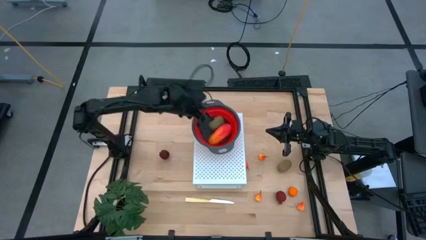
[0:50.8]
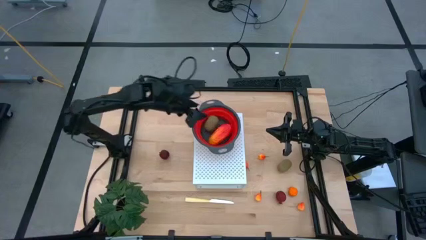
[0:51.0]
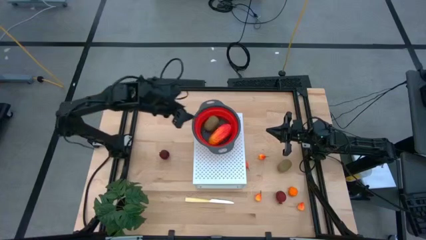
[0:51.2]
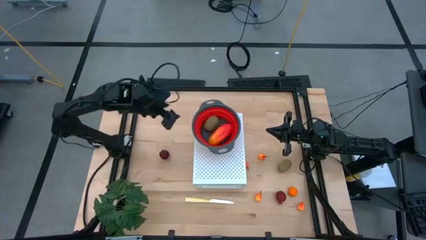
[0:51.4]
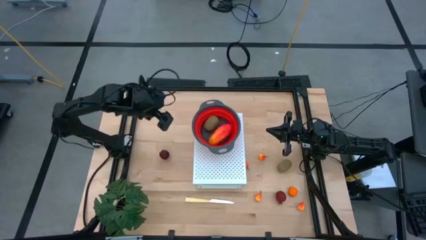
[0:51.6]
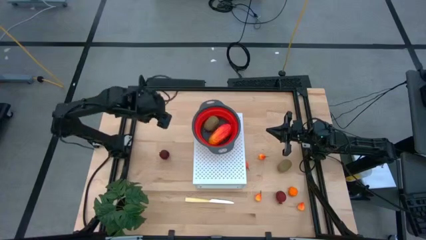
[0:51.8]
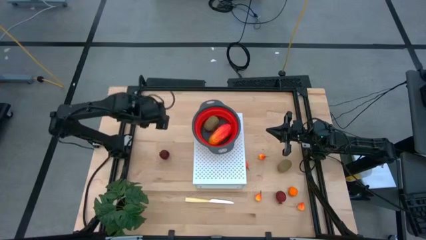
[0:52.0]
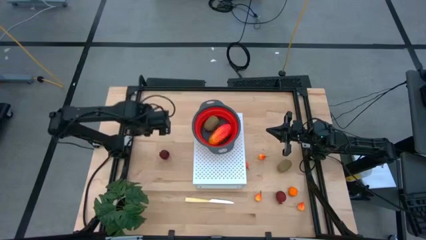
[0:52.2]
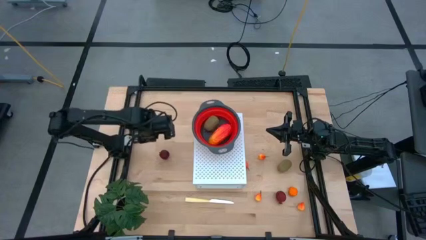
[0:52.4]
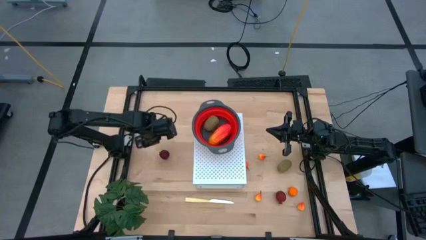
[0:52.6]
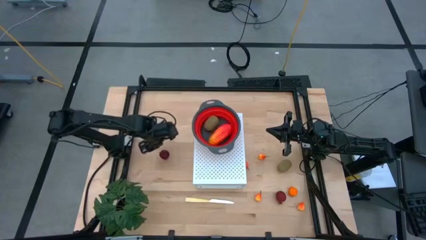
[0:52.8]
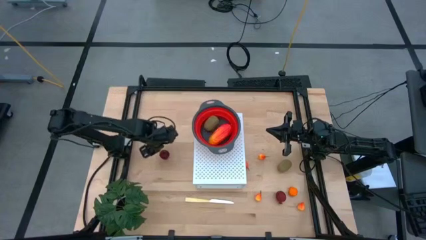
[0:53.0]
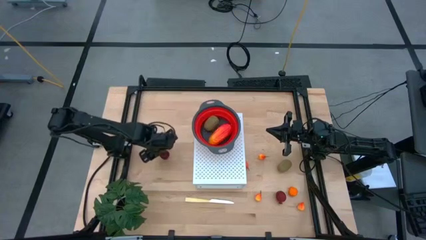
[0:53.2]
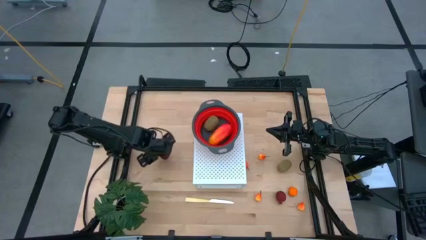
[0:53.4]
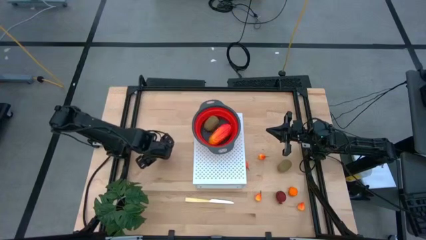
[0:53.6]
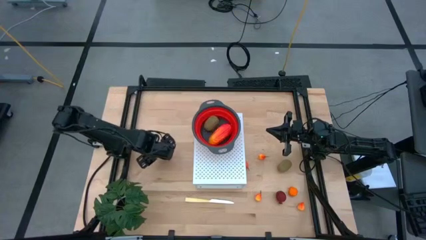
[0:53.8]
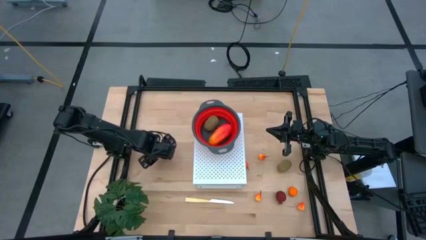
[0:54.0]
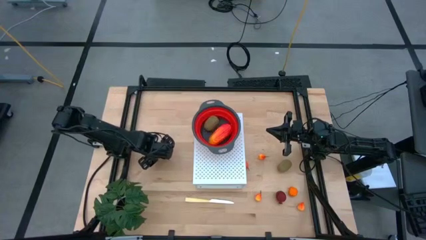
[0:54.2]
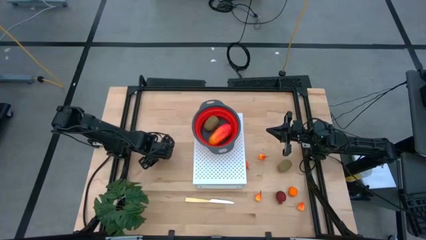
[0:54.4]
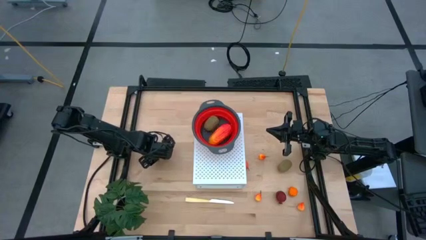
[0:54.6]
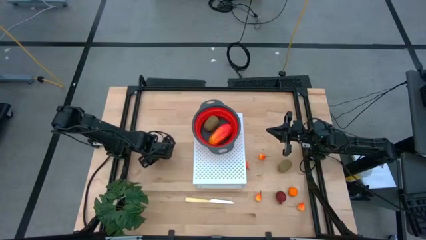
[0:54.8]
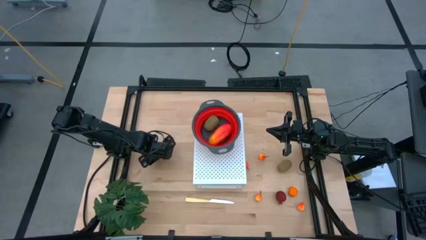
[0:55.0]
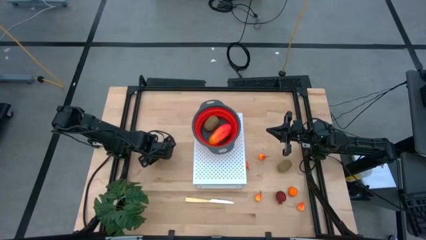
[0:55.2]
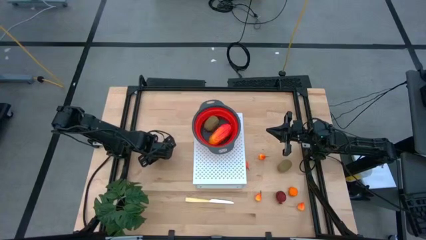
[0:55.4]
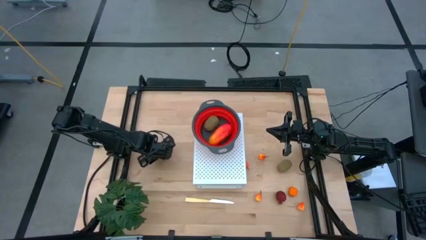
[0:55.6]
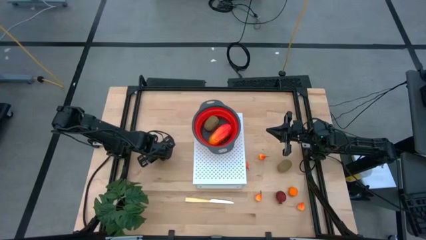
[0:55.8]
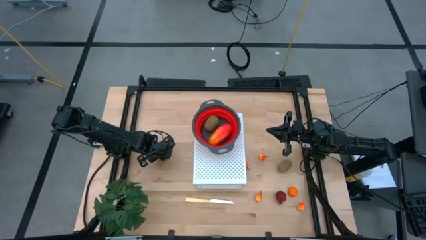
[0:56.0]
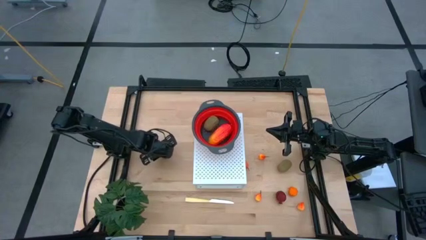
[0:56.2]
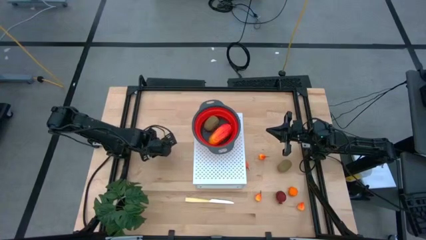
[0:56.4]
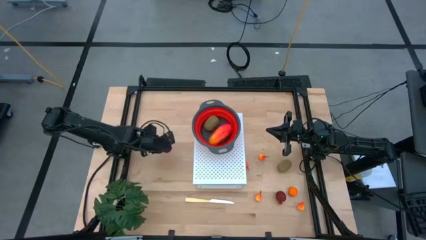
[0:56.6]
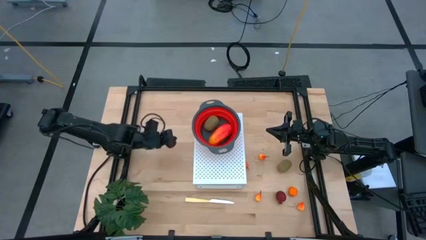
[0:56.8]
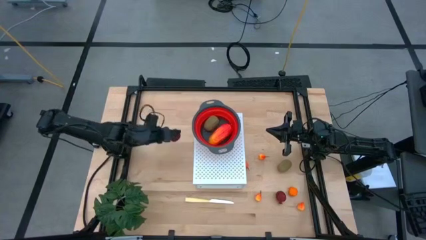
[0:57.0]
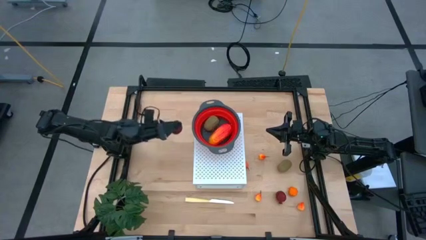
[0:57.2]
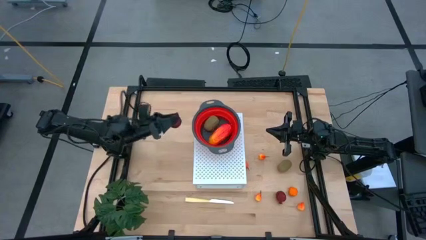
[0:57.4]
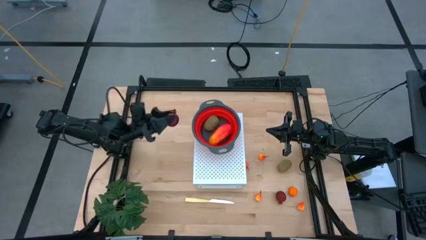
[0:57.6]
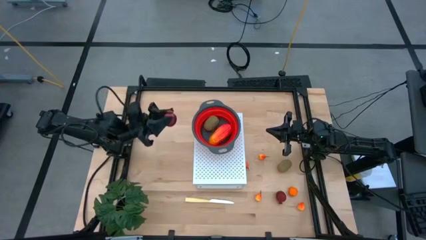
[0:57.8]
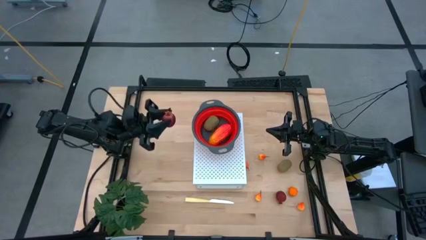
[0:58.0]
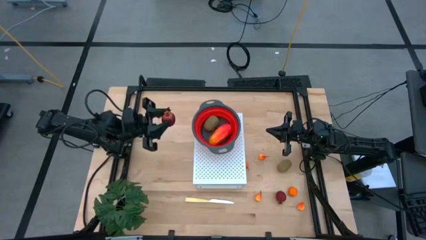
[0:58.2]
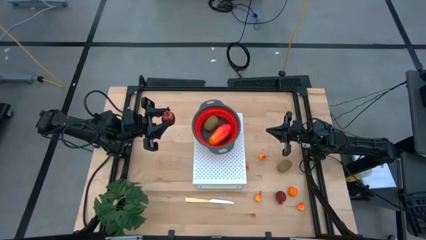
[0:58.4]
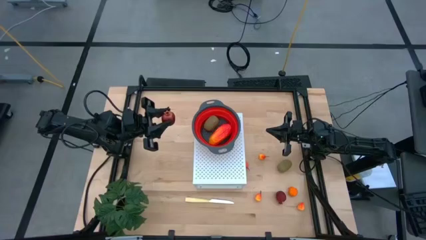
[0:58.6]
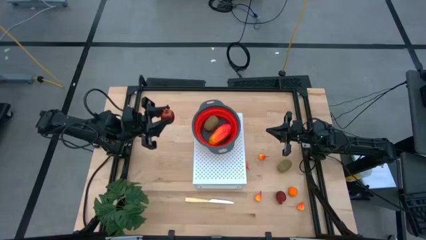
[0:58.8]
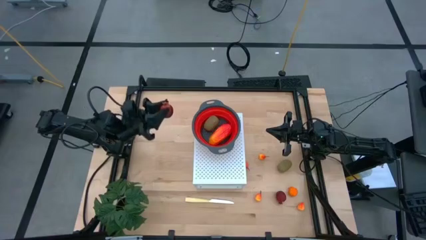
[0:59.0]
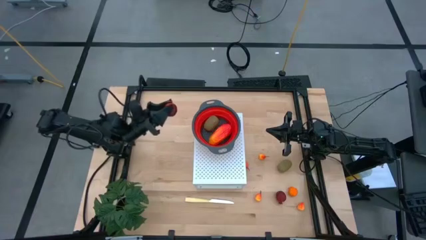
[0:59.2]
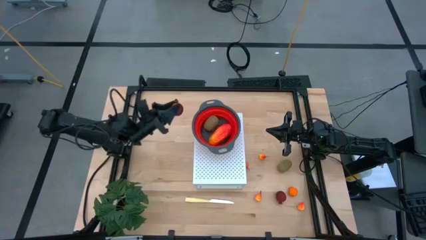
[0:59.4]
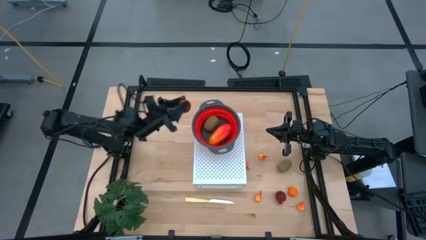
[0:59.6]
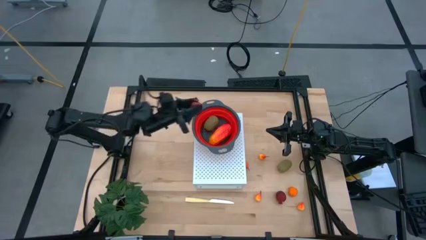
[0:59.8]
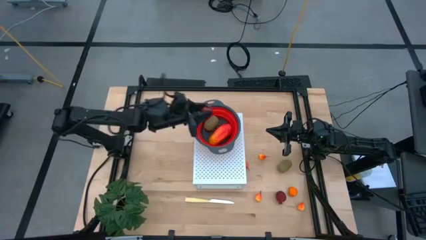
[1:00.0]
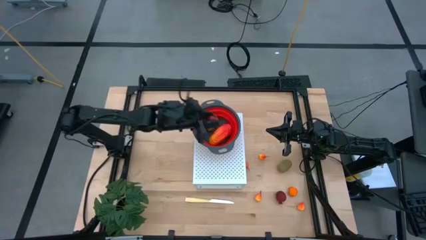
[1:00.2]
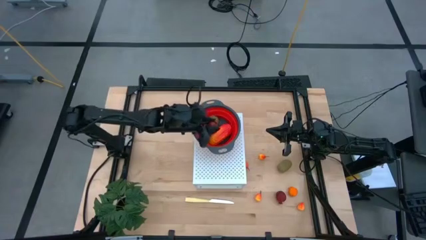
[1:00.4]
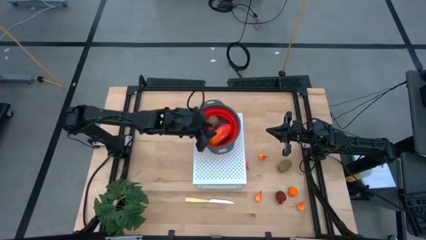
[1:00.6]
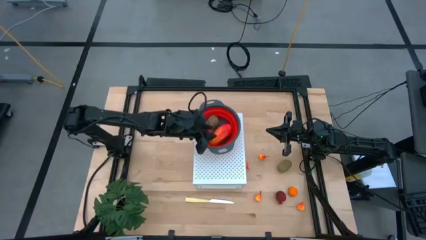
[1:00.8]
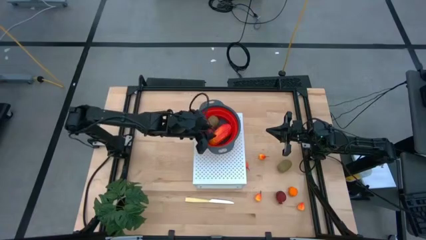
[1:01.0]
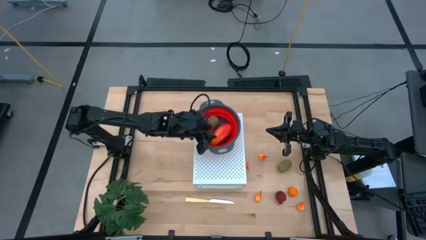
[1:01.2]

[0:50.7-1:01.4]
Task: Pick & Place Fruit
Put the pomegranate into the red strainer bowl on the shelf

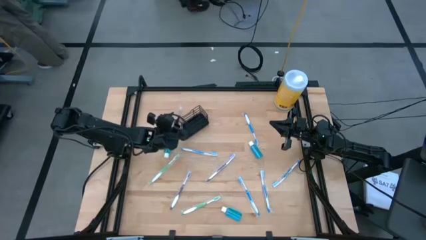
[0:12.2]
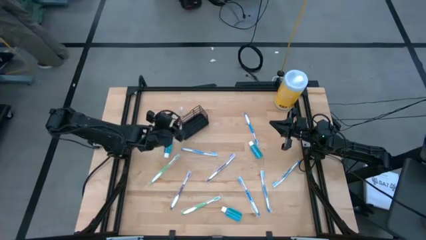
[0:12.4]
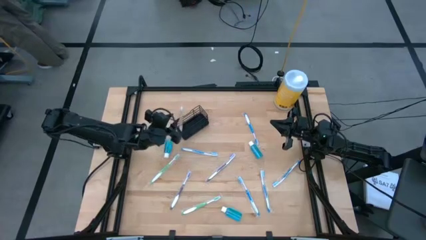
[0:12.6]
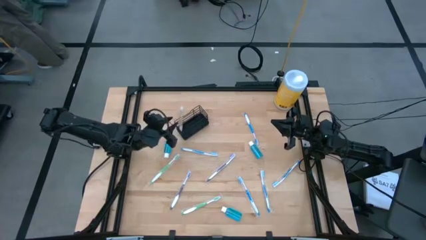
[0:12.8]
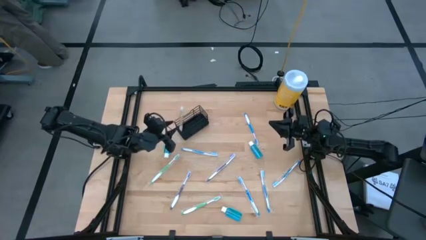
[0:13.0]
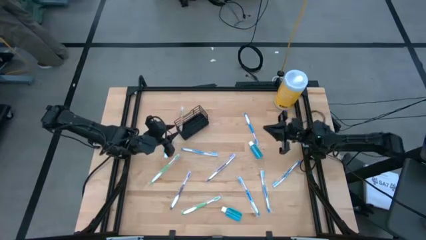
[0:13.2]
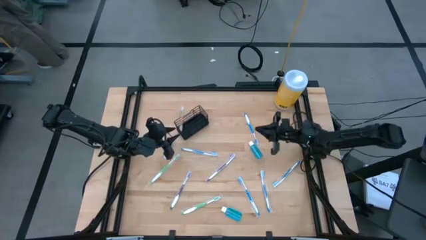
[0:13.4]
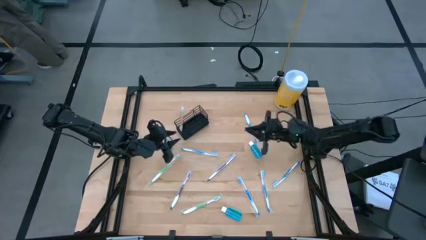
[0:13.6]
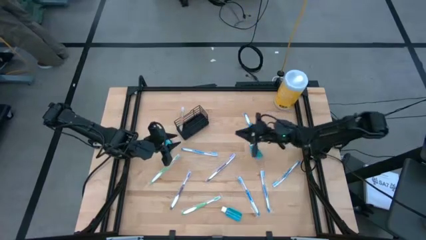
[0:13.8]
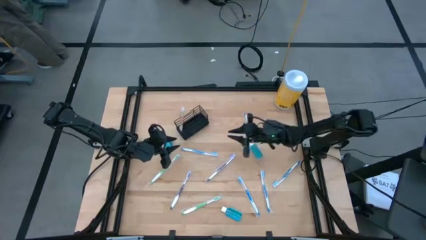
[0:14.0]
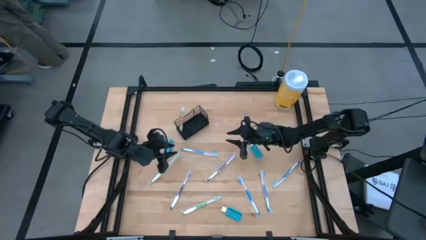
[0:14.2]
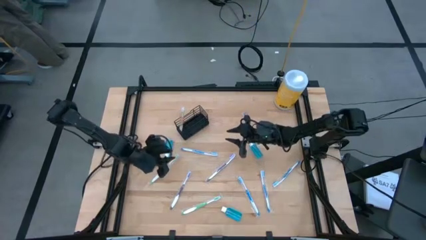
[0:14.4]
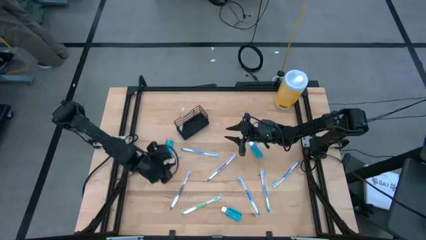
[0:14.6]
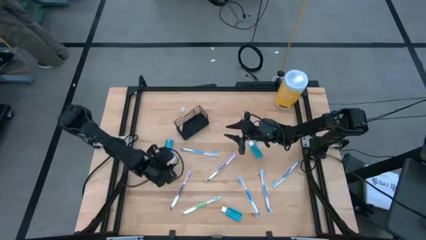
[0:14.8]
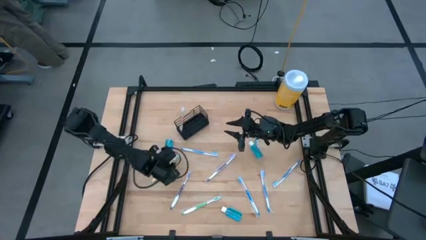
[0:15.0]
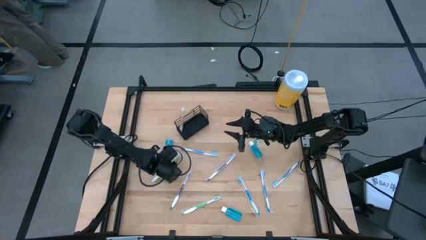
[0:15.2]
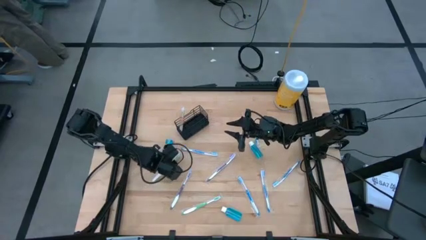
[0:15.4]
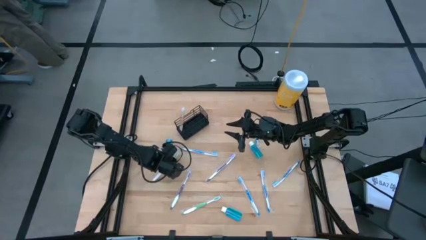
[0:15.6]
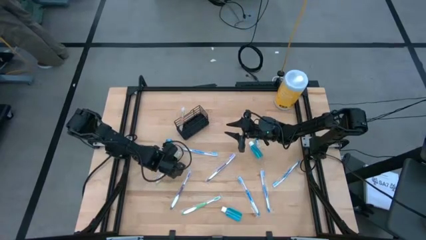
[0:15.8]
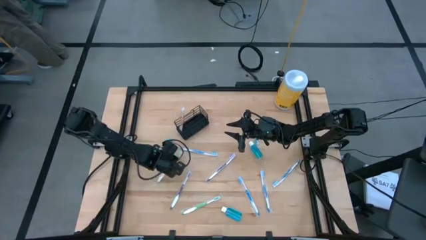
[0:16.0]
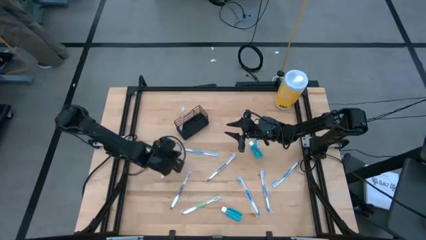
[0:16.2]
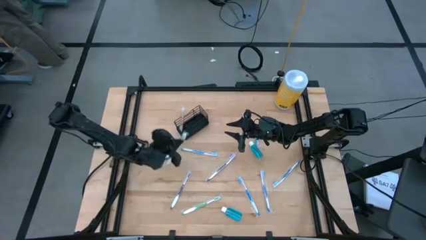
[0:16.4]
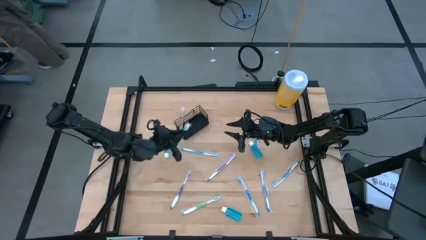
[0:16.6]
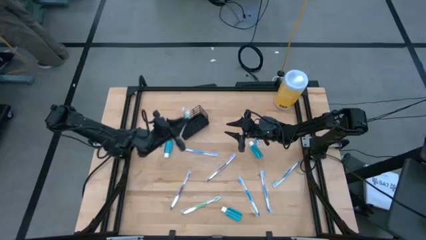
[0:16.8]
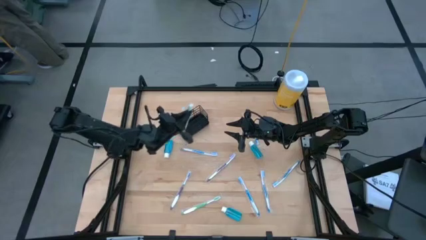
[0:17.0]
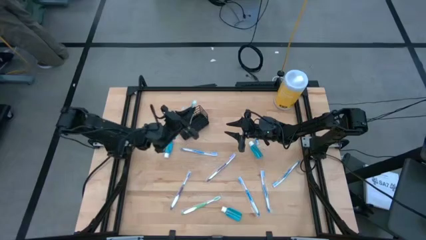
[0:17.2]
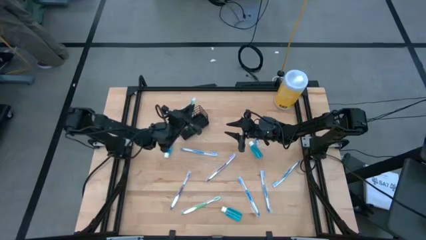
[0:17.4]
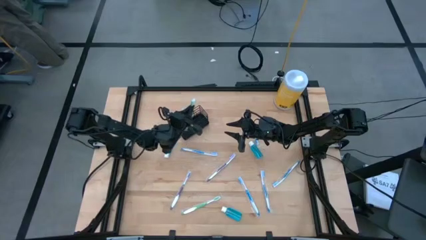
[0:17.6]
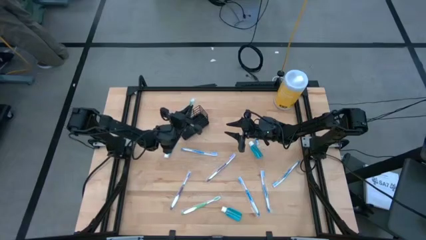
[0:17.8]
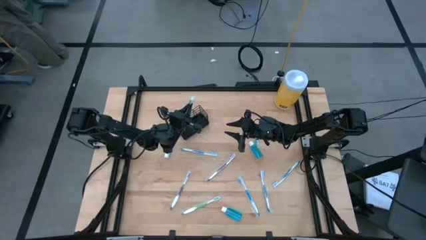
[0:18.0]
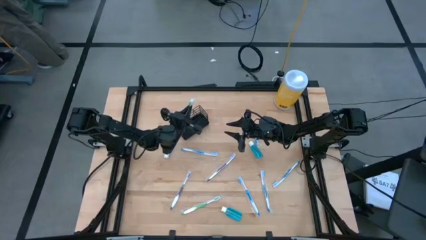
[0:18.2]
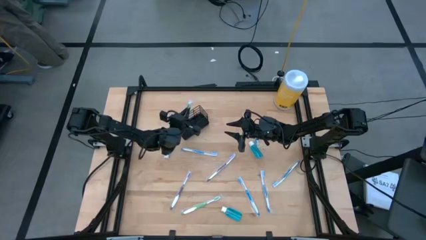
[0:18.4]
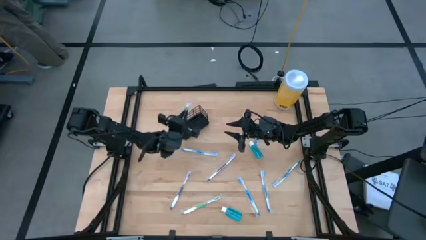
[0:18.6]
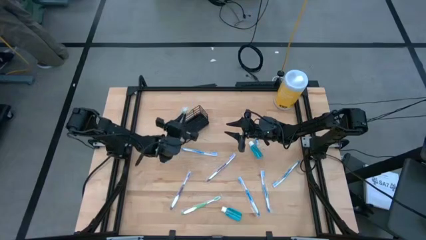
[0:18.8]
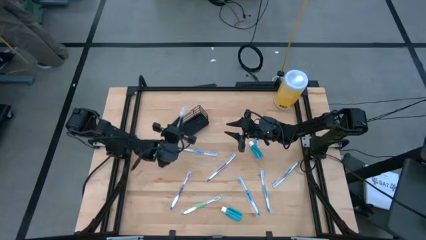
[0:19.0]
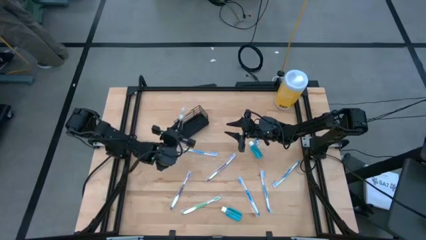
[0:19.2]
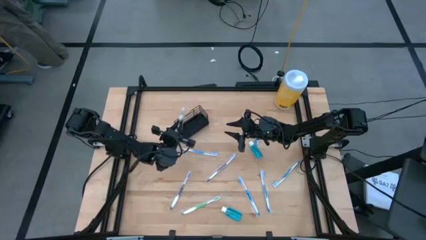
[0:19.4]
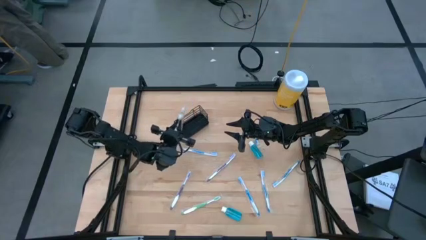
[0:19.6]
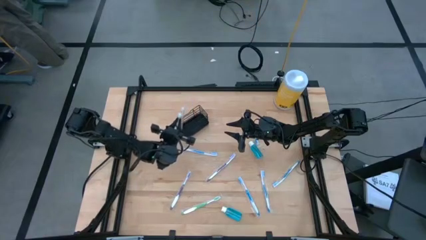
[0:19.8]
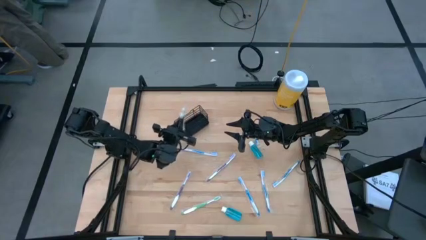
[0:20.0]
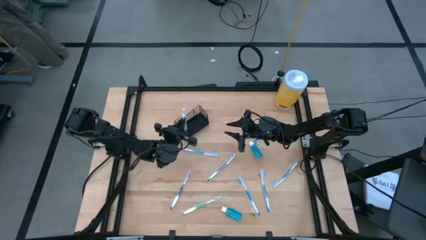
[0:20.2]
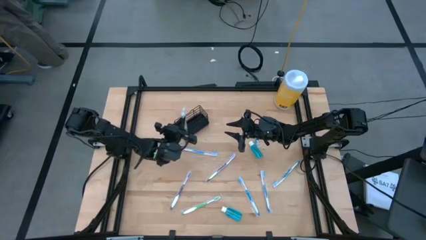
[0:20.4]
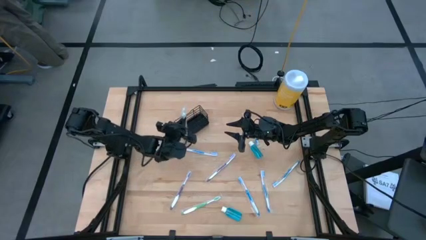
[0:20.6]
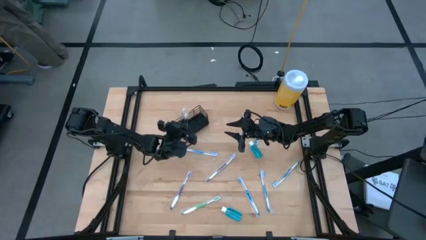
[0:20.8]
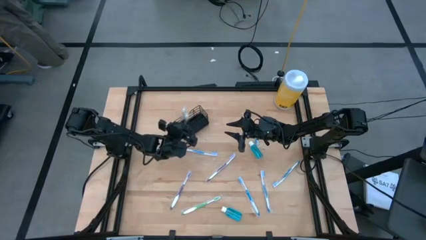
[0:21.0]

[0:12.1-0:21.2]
Task: Pick & Place toothbrushing station
Put the green toothbrush into the black wire organizer
